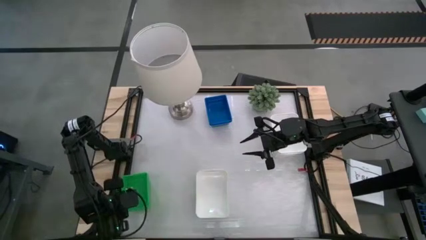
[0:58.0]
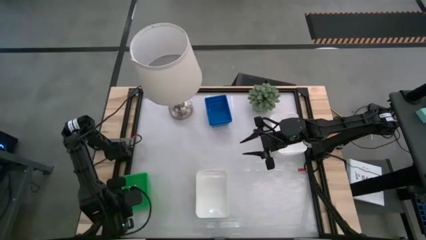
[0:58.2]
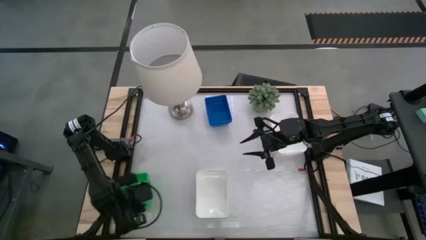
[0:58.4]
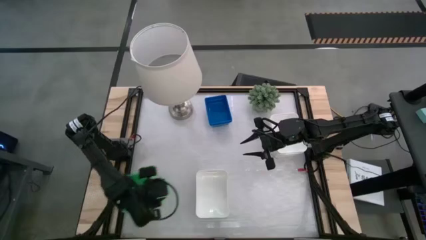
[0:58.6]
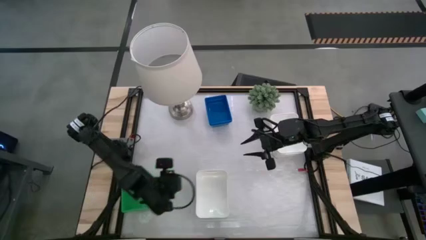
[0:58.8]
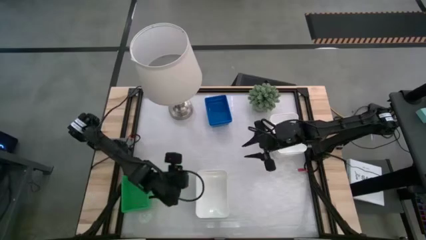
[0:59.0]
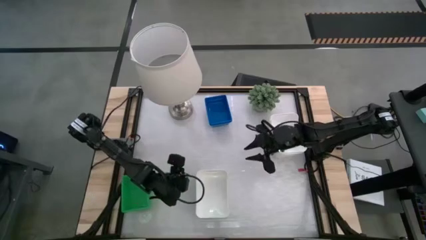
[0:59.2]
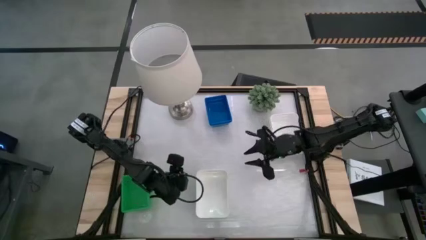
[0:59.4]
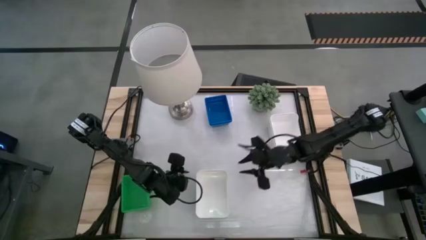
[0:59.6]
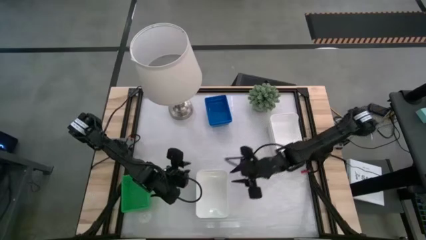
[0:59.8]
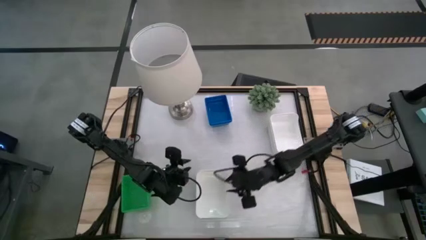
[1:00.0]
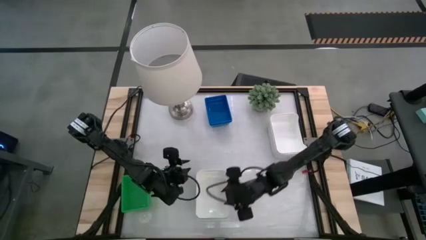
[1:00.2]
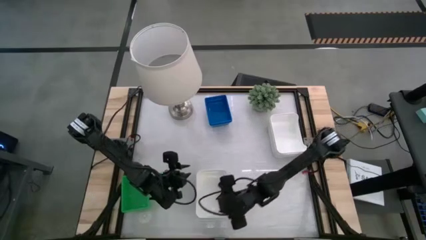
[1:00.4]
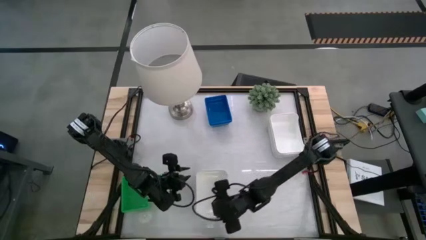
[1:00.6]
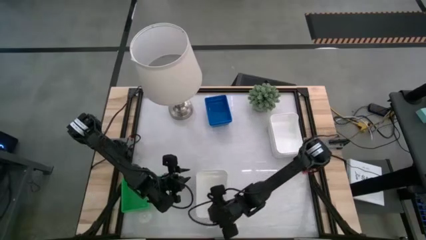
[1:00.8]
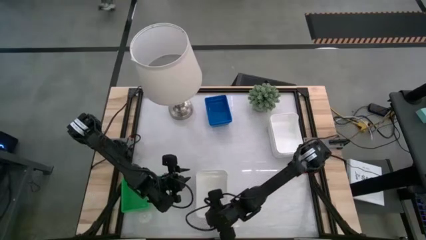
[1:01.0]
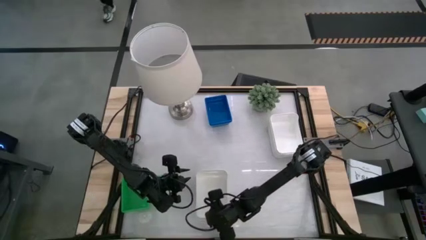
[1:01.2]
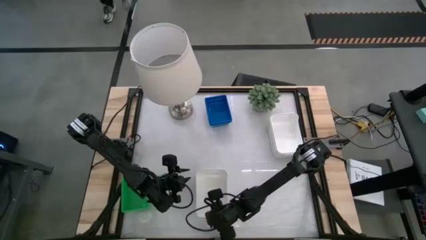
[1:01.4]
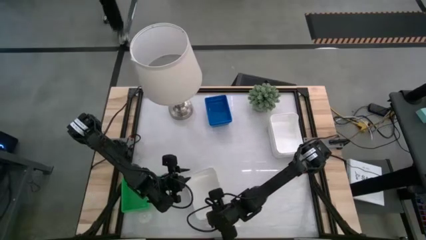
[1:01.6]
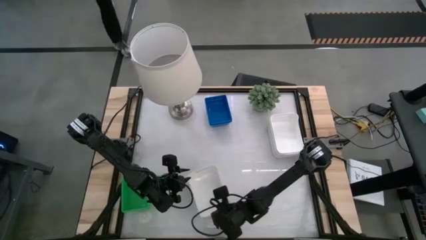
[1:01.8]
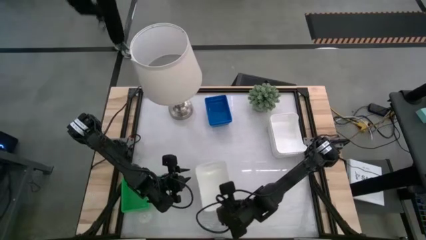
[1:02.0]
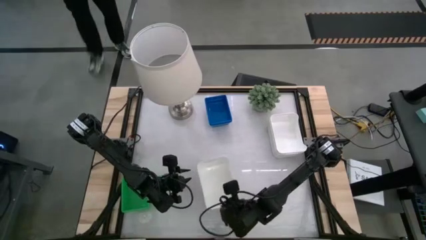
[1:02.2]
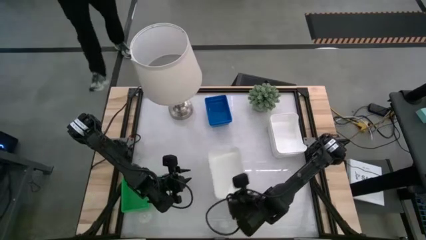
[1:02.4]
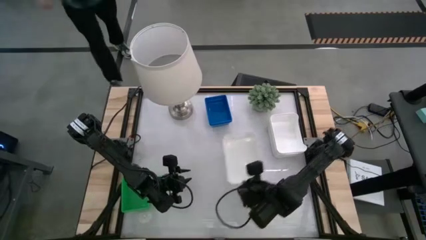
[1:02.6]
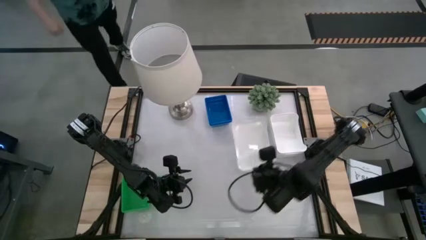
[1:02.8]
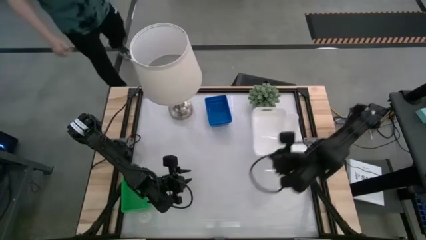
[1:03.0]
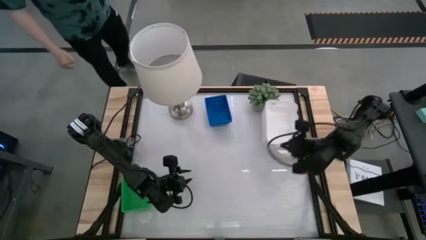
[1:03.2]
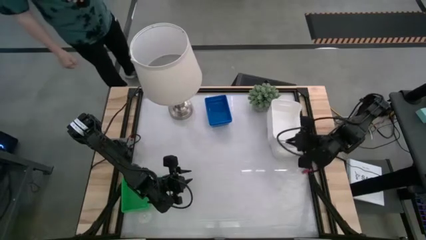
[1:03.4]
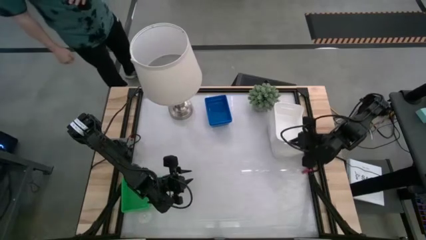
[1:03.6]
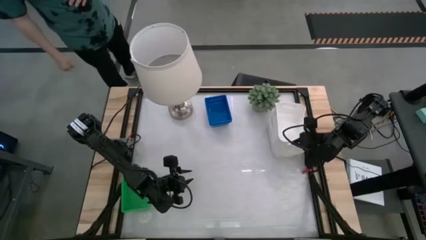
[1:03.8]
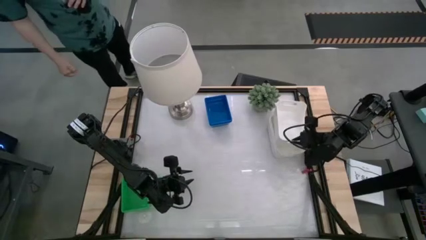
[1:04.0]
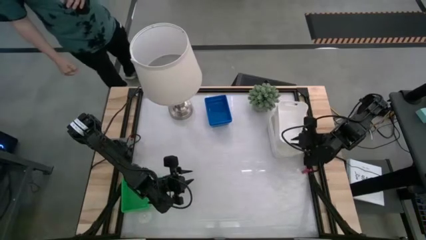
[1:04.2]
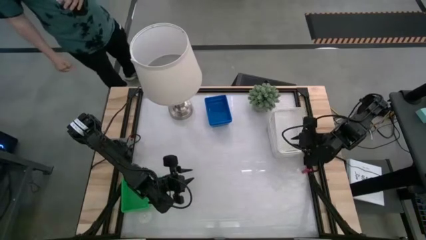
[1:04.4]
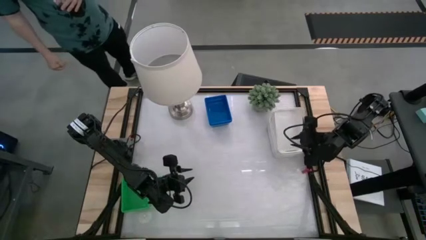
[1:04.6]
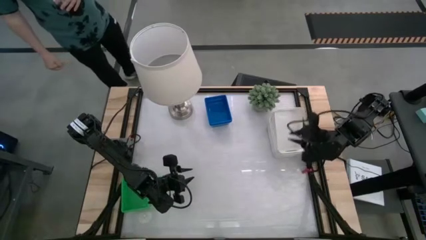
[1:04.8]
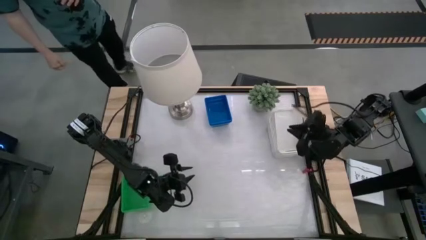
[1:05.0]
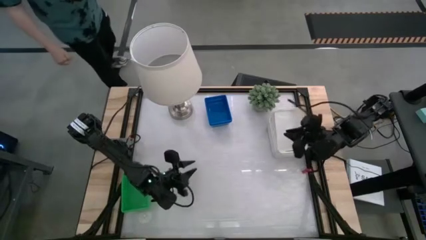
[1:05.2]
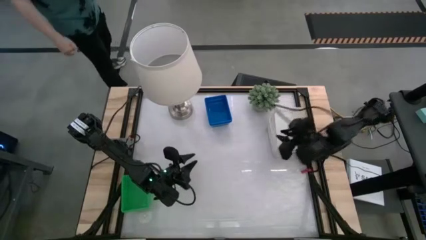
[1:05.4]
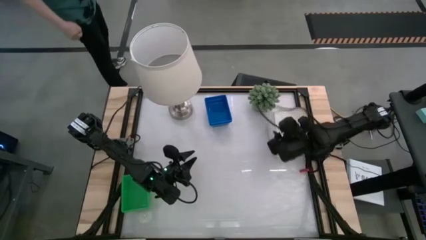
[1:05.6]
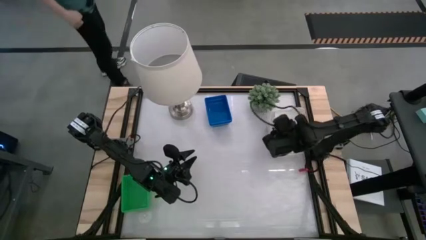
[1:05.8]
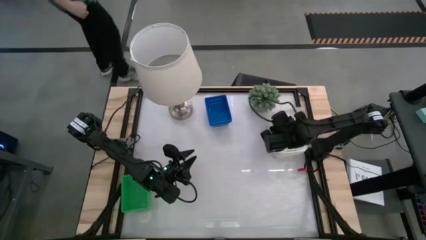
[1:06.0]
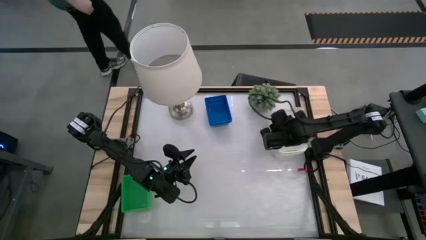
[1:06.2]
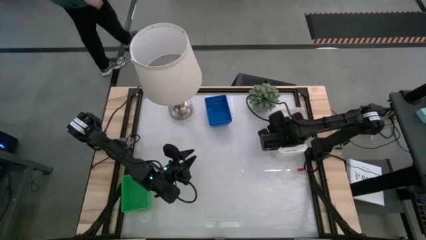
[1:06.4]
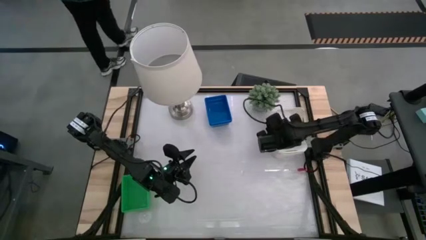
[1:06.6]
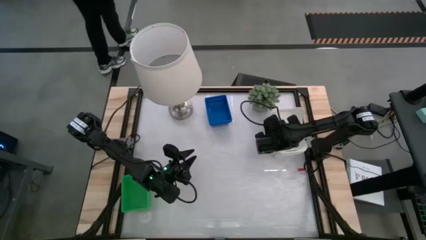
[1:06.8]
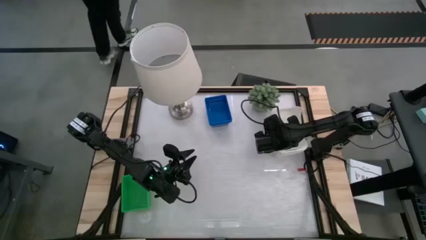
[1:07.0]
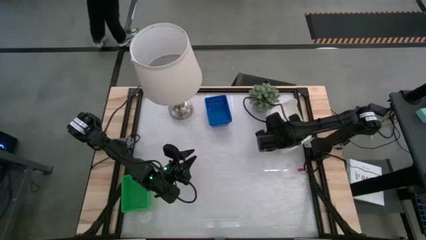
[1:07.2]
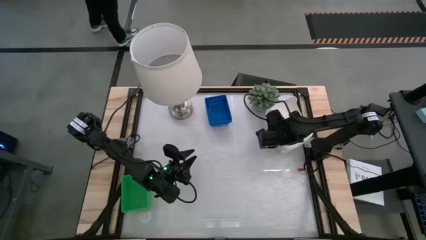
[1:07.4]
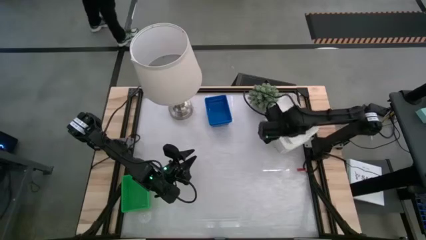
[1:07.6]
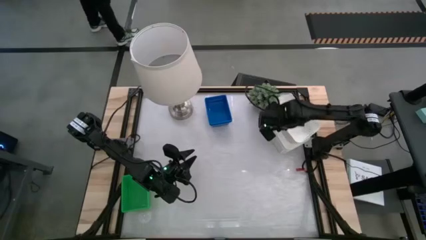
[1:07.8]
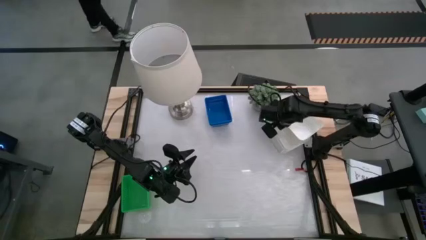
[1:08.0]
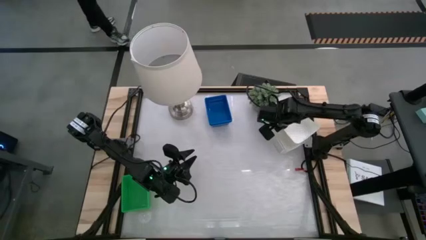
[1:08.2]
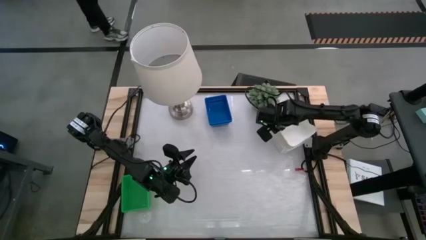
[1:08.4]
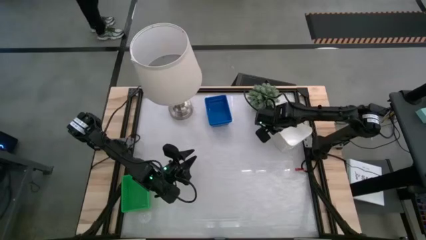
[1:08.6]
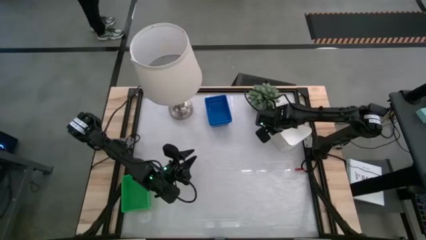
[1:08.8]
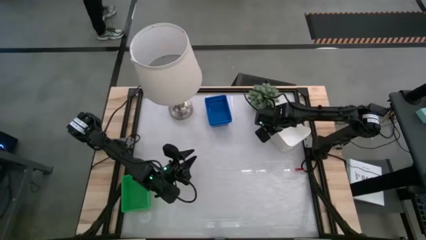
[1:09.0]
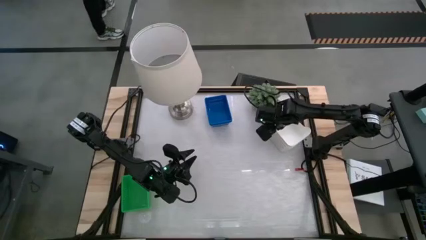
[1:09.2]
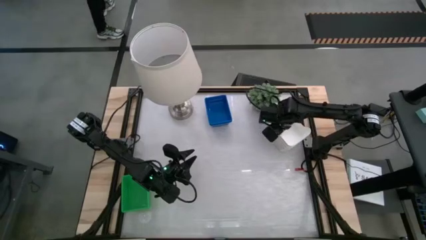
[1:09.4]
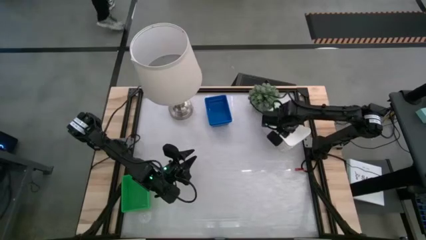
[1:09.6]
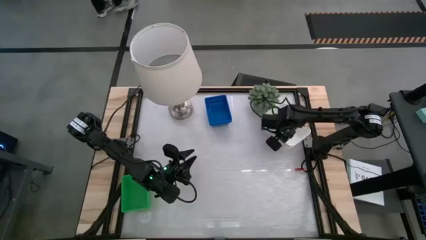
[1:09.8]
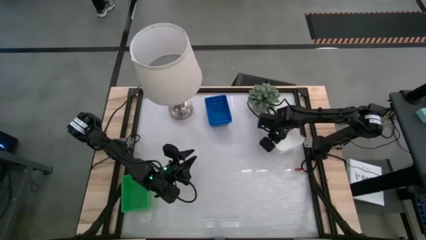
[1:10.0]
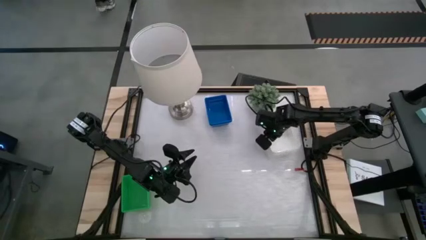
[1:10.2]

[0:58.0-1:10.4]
Stack the bottom white bin on the stacked white bins

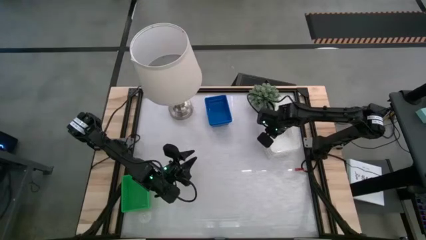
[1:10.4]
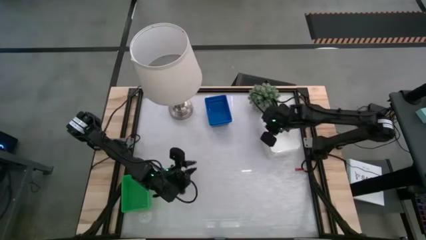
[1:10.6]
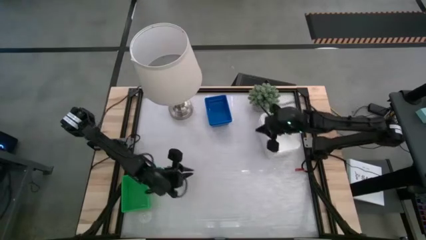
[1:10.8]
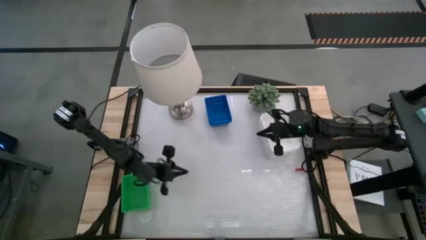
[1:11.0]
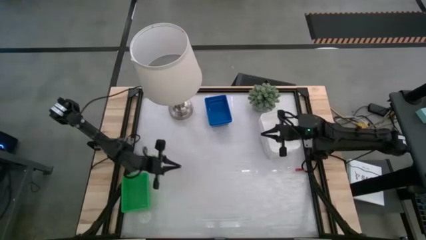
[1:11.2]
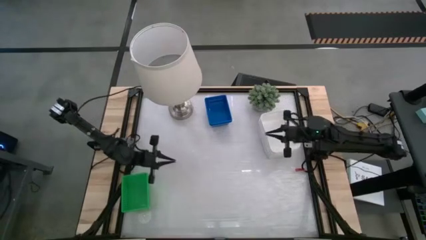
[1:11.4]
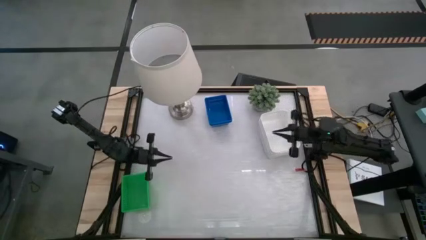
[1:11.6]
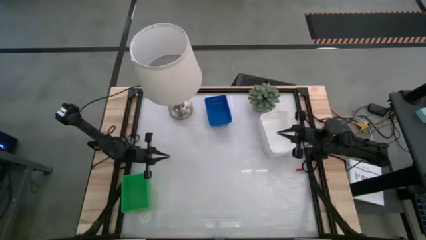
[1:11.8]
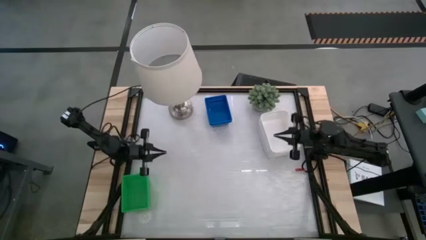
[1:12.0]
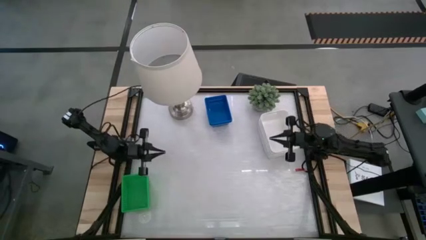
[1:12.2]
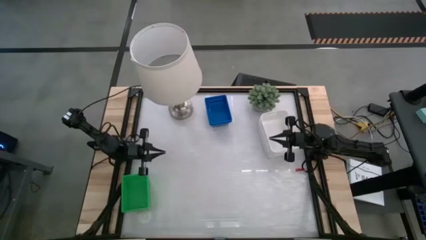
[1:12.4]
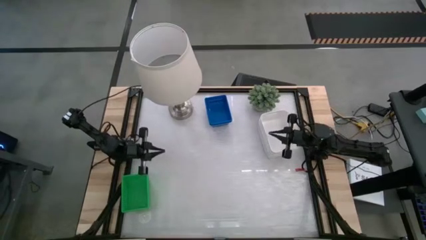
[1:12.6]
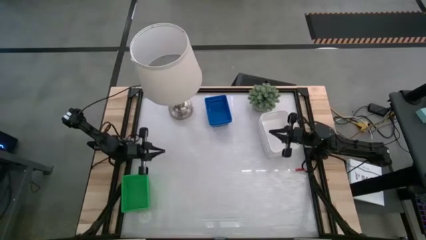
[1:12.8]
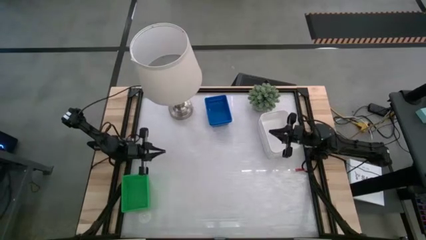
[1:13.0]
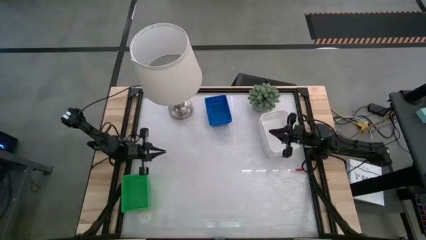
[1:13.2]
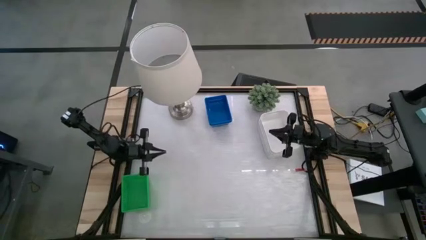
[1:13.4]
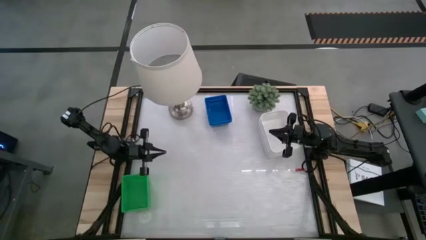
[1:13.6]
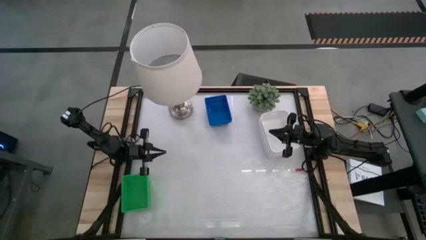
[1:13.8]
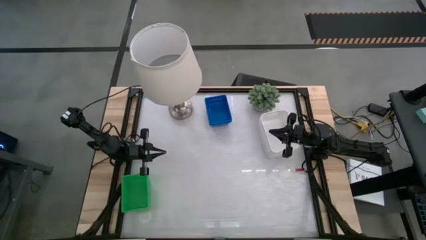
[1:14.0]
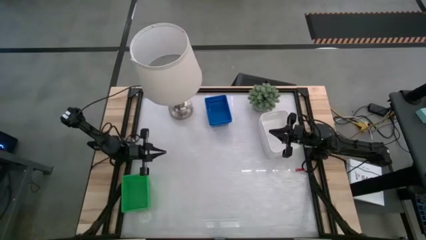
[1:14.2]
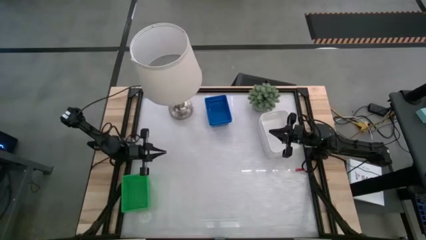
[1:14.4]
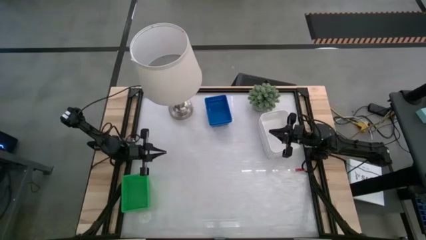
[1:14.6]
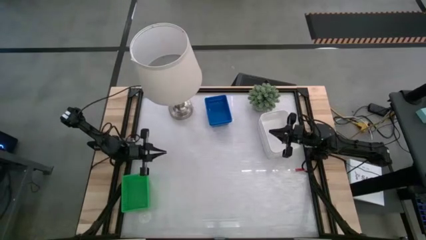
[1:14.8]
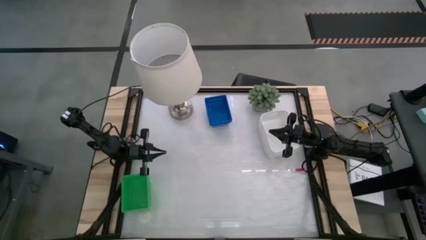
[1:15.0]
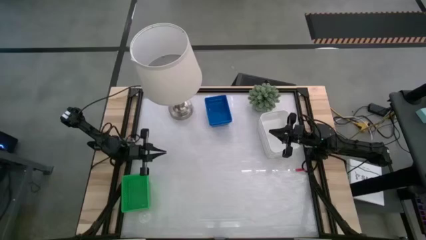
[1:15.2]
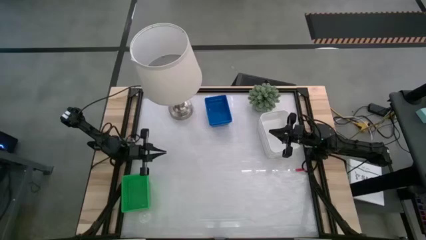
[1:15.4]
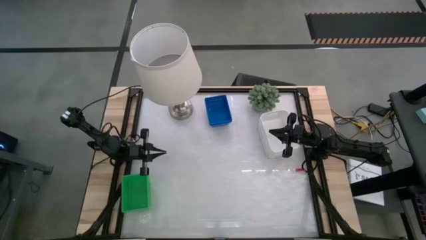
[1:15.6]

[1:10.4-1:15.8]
Return to Home Position
